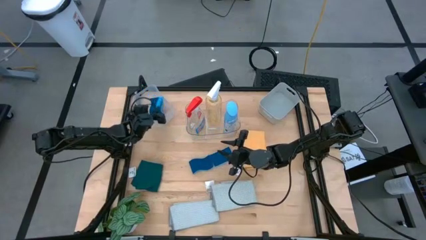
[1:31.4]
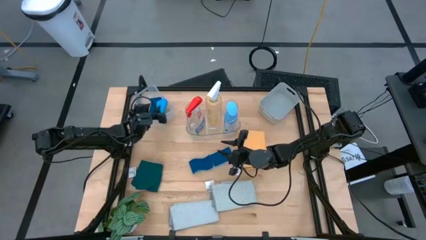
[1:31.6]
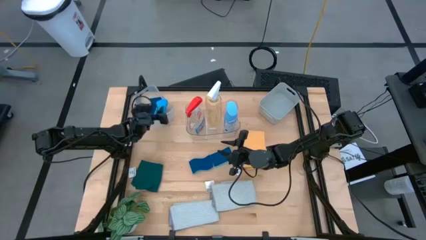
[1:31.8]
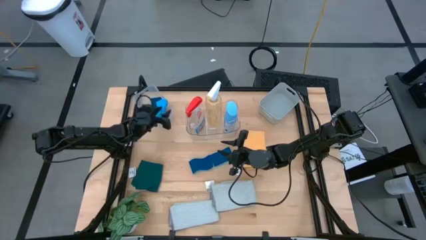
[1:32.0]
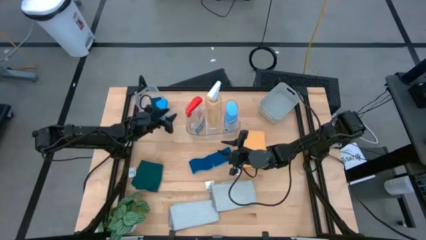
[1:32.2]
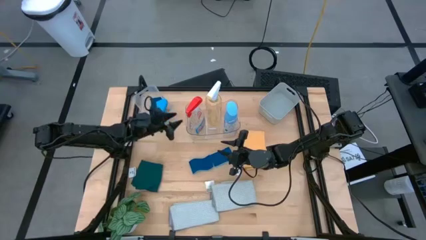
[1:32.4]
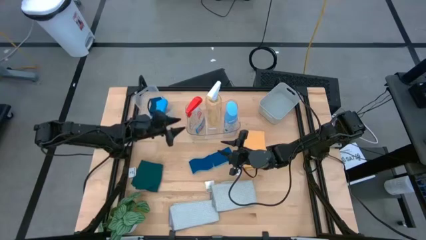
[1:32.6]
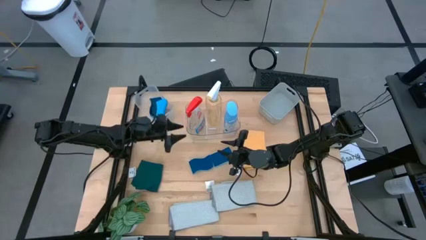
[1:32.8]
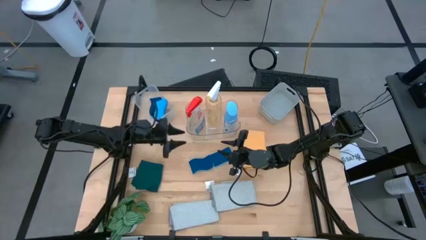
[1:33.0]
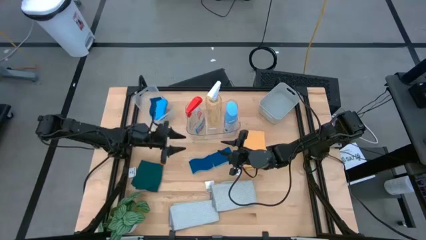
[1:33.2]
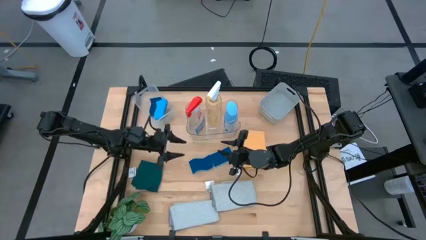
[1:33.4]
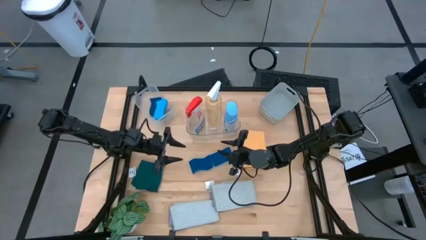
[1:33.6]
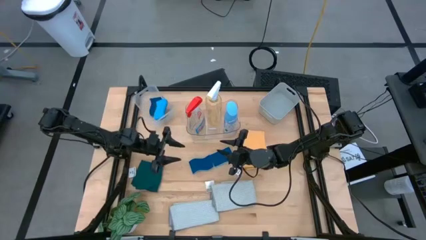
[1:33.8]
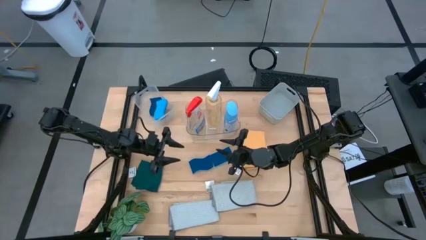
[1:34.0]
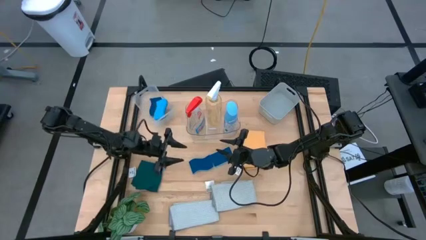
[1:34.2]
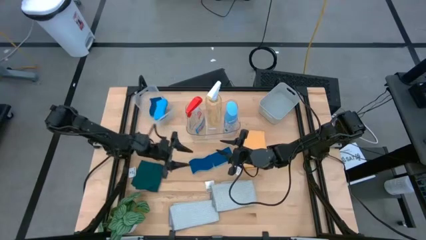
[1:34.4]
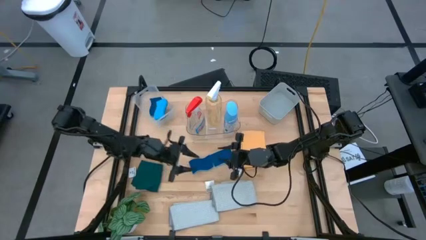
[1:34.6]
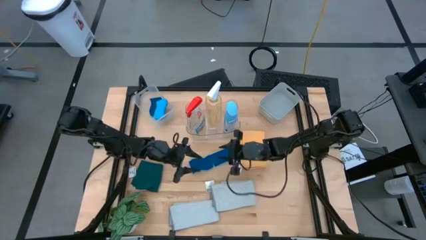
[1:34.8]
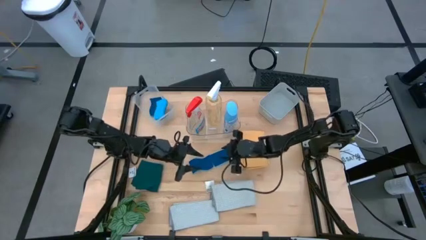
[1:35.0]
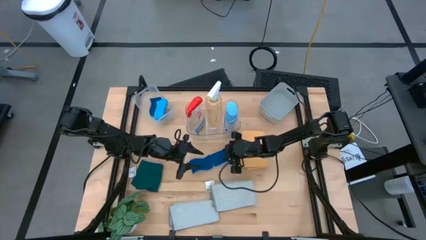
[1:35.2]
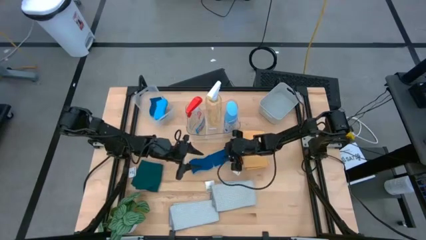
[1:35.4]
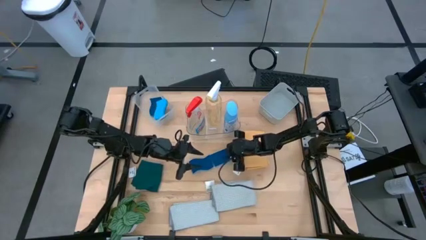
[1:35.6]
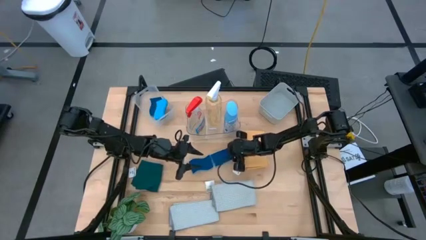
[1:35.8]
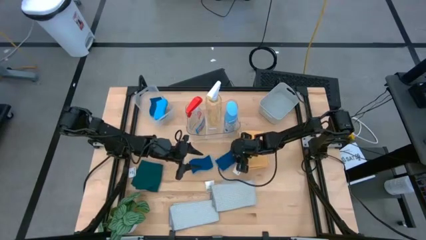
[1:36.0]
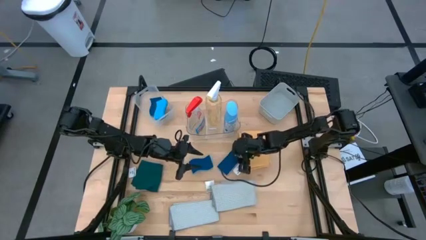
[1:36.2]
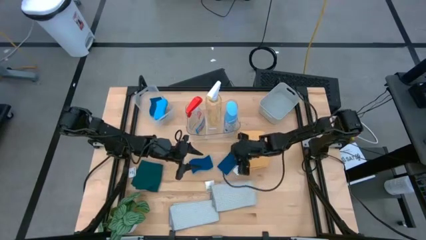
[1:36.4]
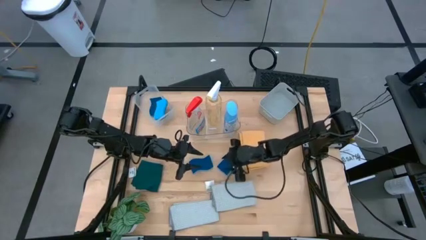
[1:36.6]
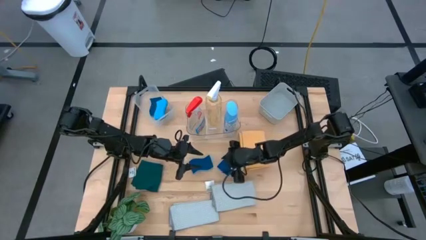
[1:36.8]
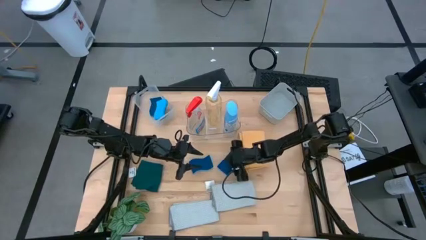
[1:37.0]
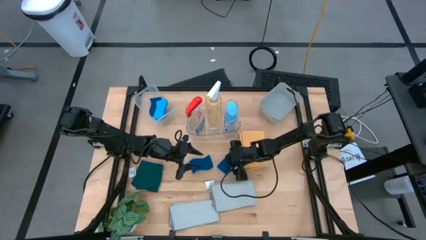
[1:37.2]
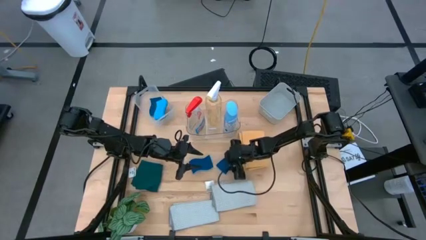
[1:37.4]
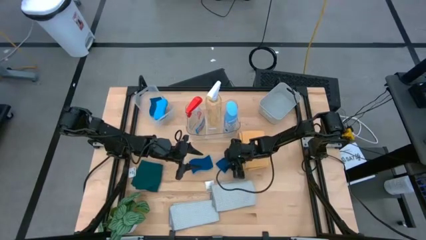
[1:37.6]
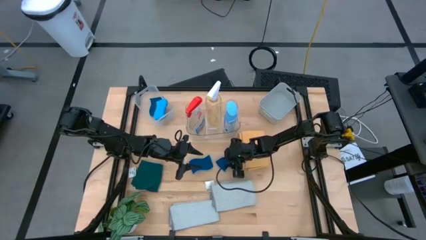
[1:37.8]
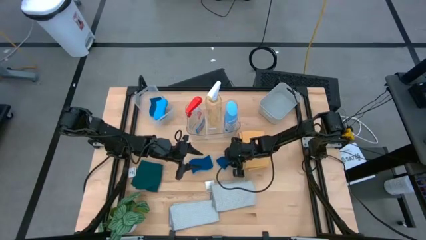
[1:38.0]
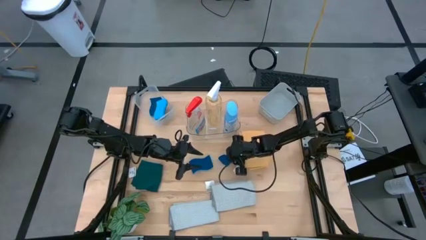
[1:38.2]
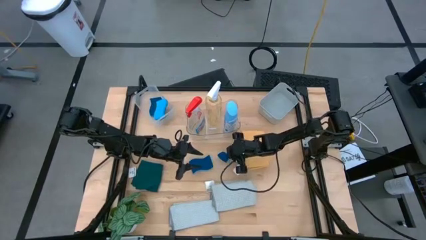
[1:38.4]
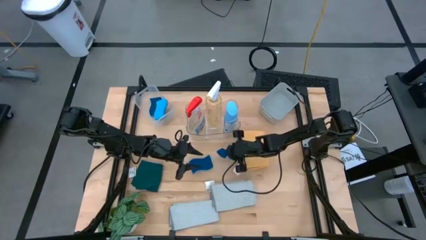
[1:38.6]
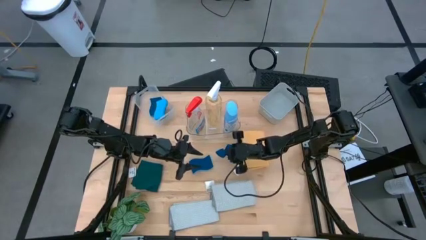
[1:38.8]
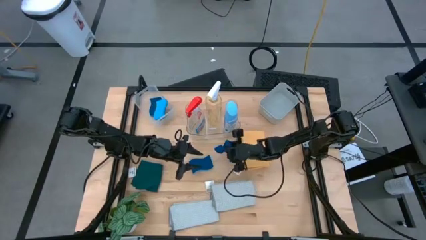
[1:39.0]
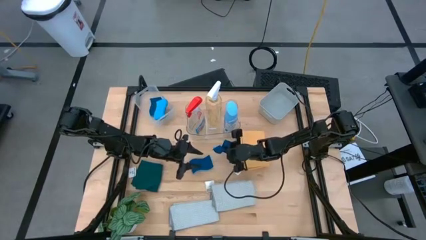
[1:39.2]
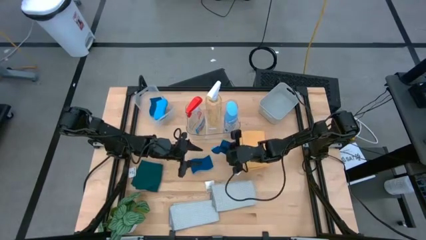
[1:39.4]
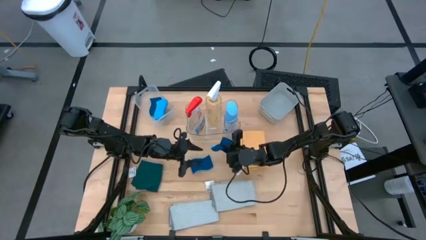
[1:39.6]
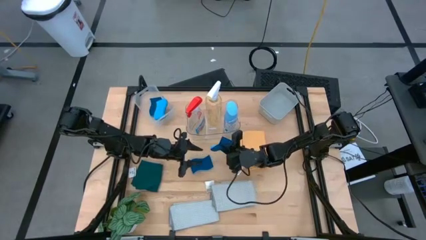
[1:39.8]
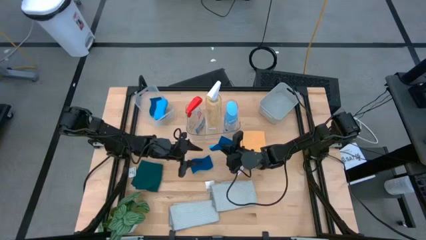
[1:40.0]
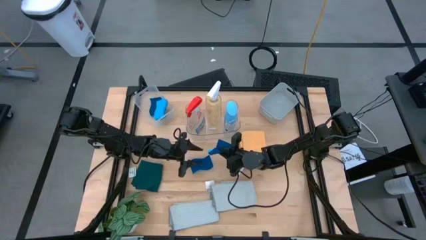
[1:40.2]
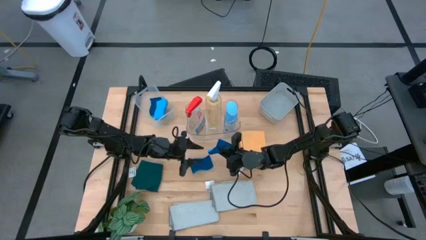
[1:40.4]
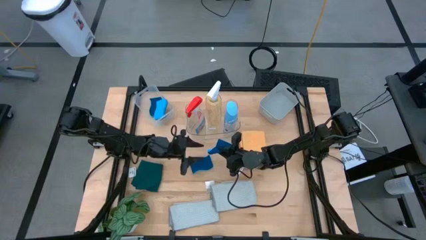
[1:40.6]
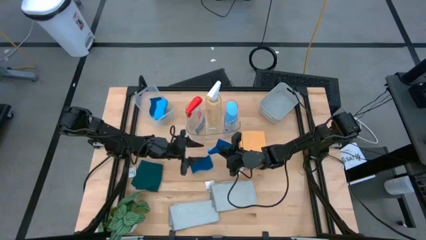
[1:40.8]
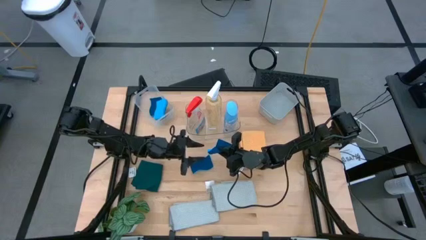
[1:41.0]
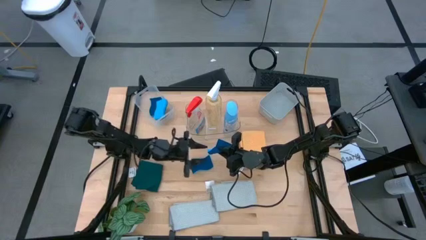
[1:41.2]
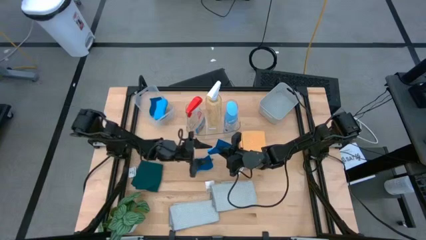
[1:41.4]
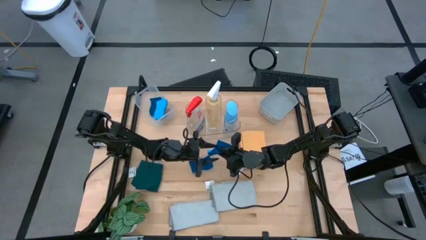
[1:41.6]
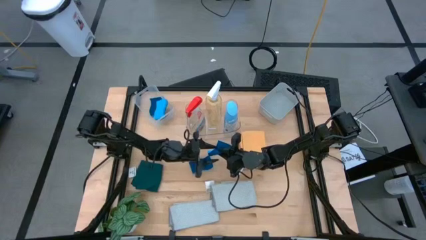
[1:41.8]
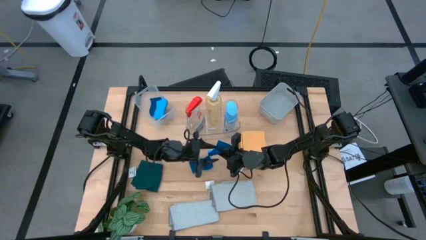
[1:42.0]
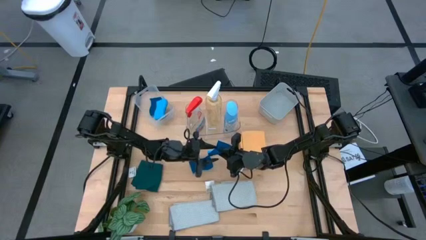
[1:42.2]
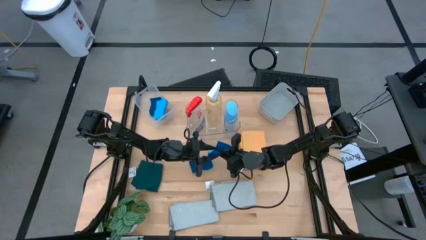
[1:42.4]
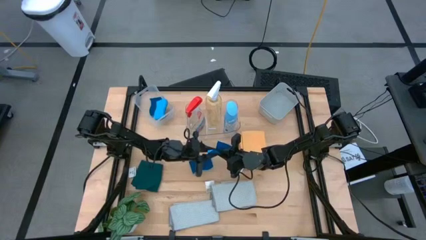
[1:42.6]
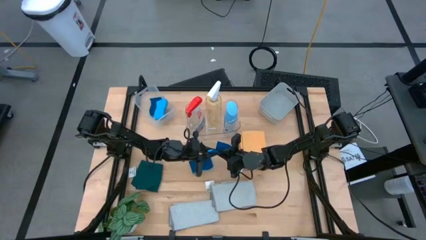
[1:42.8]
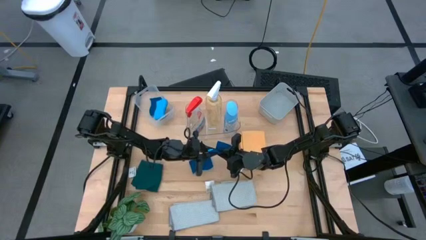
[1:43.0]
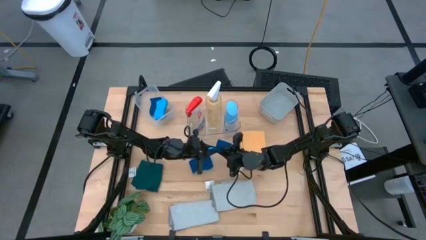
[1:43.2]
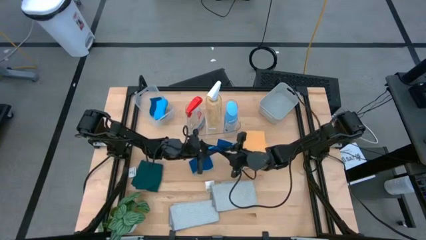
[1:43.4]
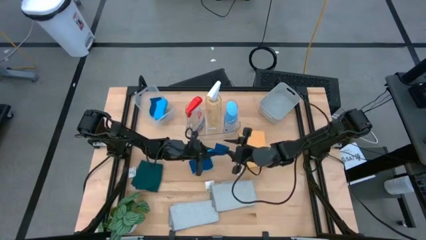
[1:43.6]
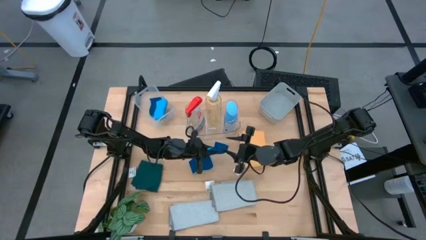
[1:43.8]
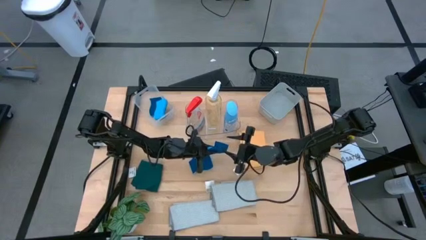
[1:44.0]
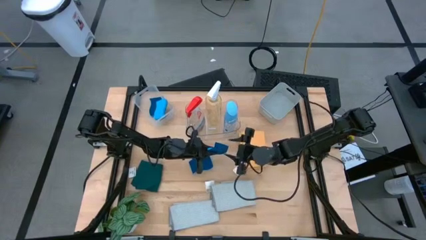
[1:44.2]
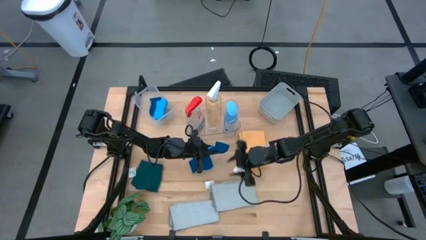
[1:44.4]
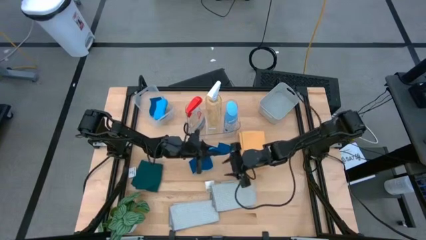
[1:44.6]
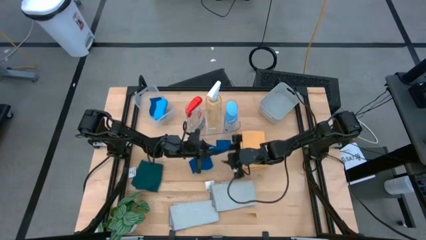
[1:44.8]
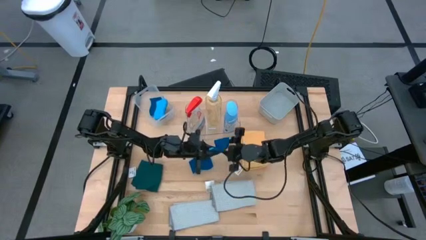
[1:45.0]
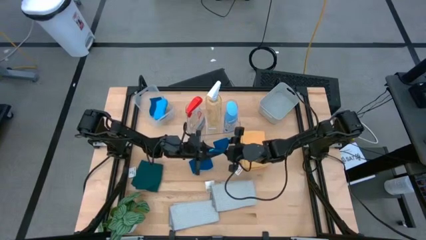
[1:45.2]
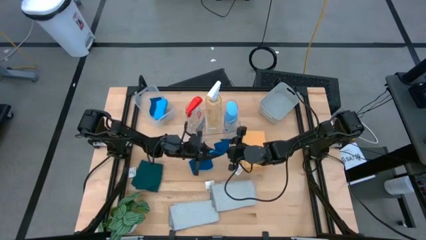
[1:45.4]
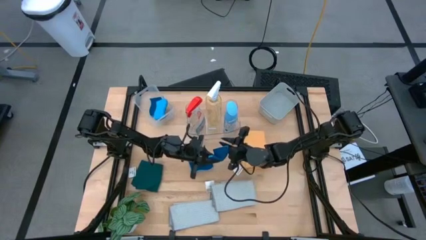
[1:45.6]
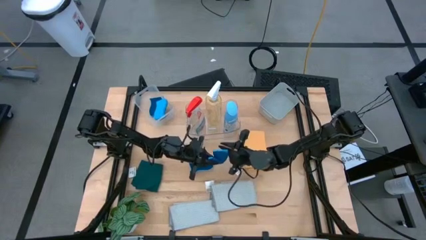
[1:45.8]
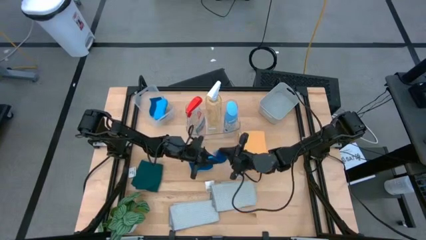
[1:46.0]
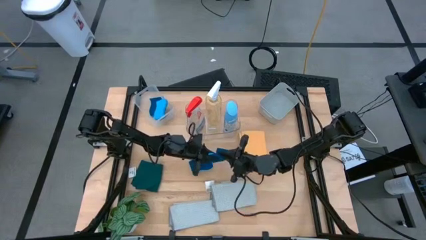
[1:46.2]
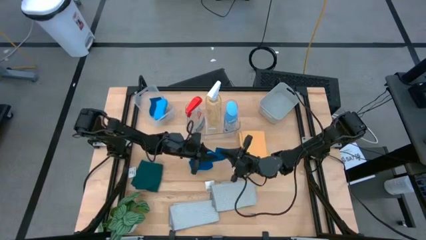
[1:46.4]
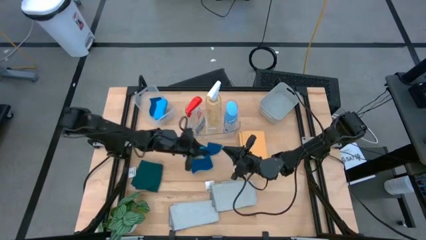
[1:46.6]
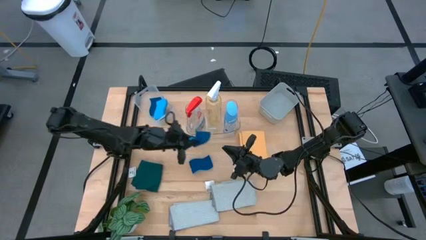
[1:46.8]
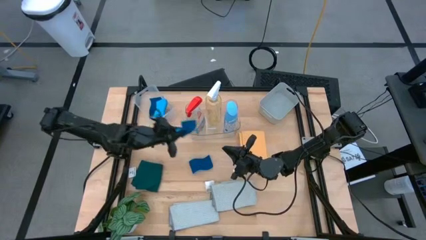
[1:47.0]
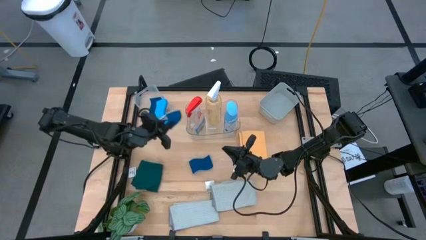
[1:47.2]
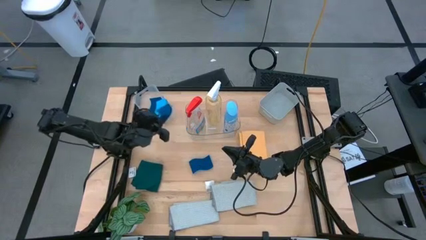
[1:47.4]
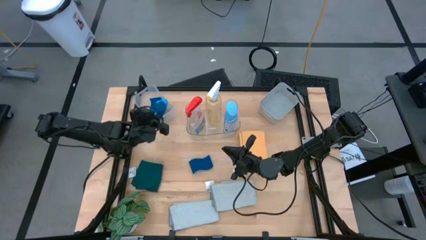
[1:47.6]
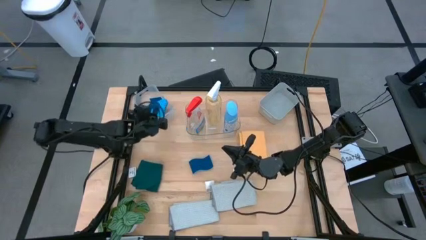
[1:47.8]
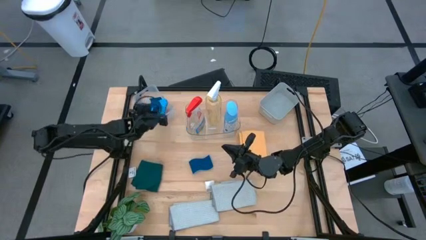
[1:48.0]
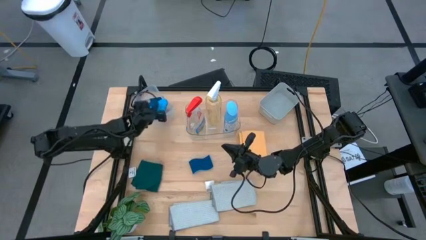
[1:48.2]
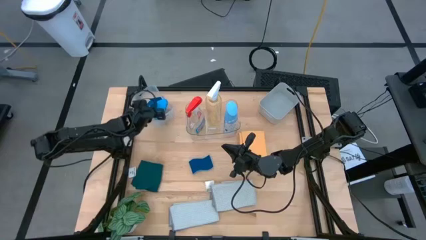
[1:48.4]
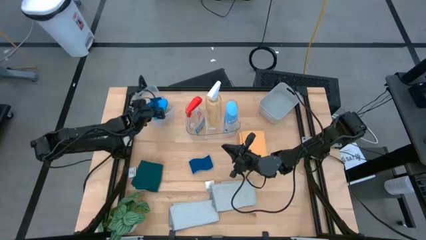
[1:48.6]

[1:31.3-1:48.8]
Task: Pick & Place Kitchen Items
Put the blue sponge into the white bin
